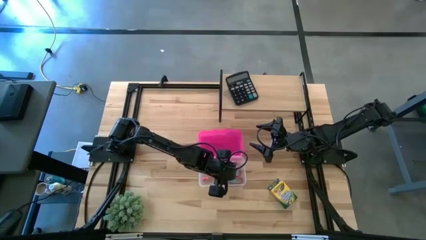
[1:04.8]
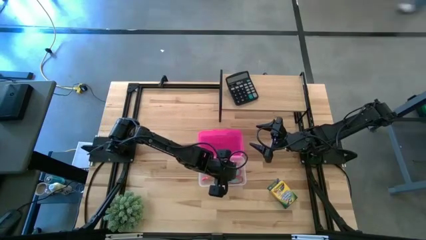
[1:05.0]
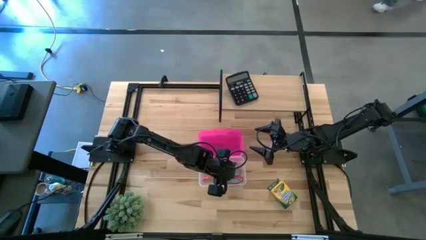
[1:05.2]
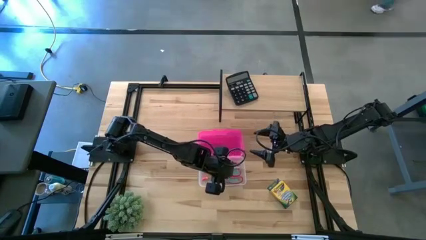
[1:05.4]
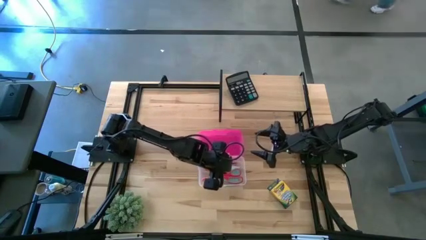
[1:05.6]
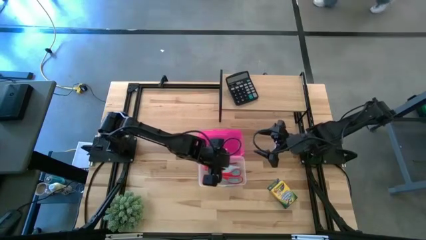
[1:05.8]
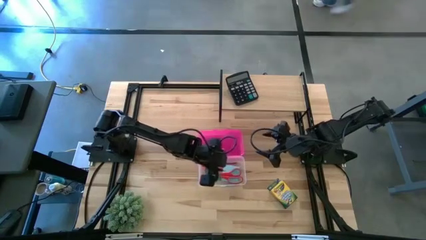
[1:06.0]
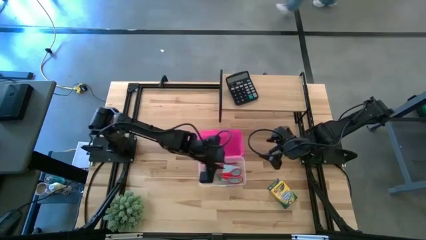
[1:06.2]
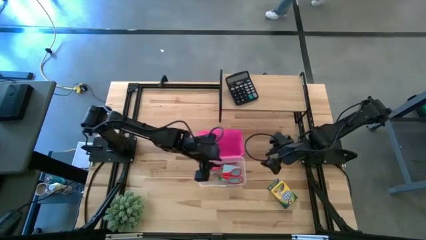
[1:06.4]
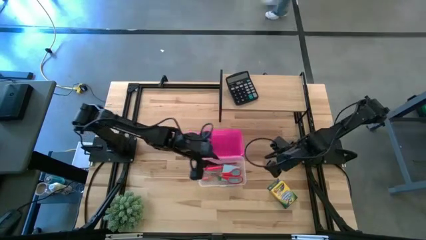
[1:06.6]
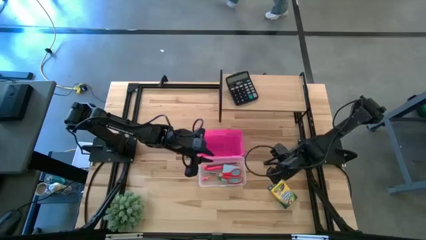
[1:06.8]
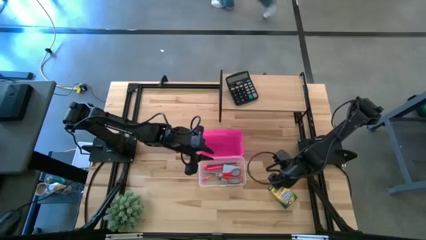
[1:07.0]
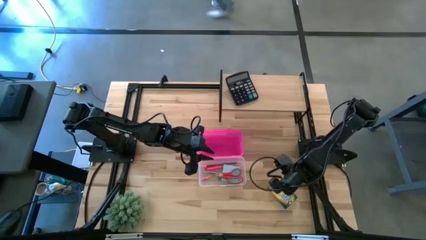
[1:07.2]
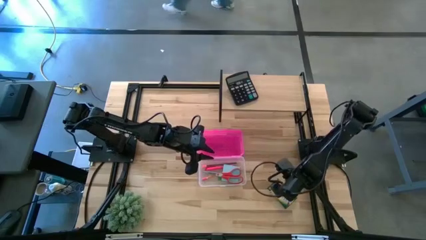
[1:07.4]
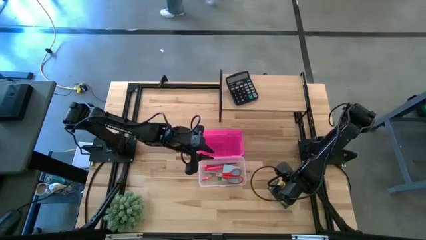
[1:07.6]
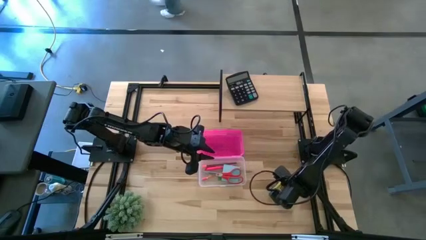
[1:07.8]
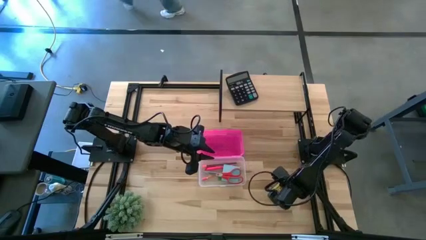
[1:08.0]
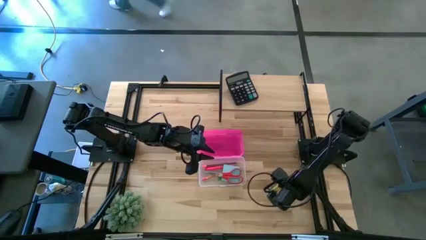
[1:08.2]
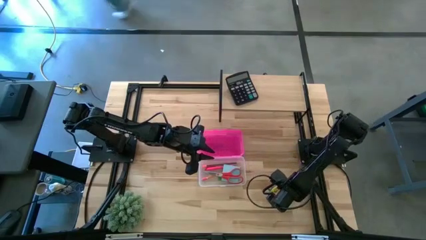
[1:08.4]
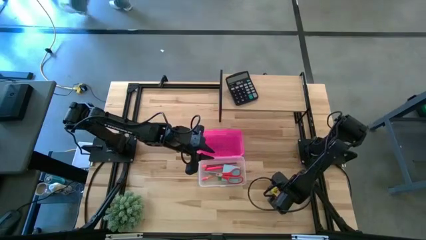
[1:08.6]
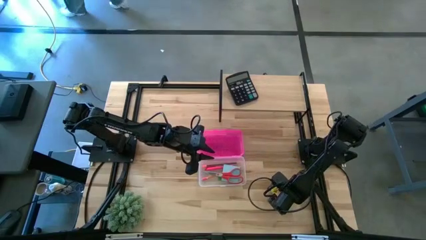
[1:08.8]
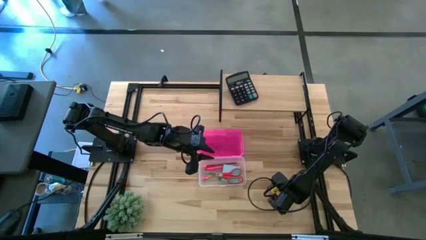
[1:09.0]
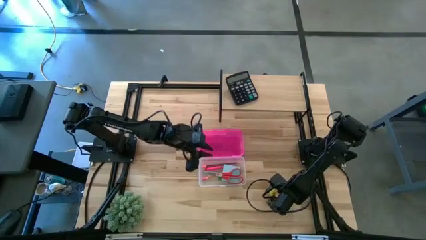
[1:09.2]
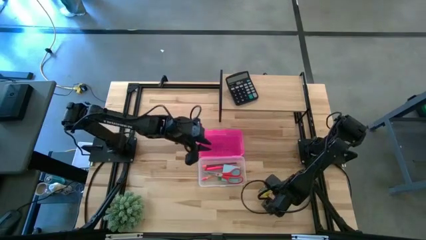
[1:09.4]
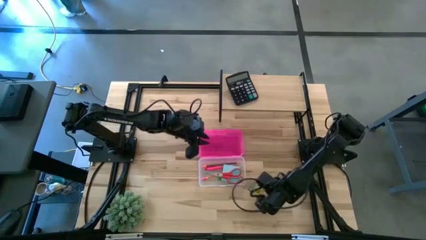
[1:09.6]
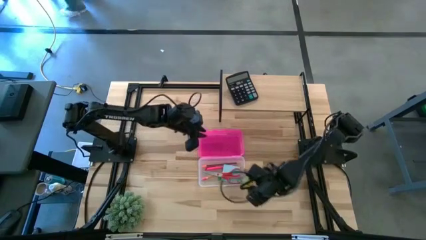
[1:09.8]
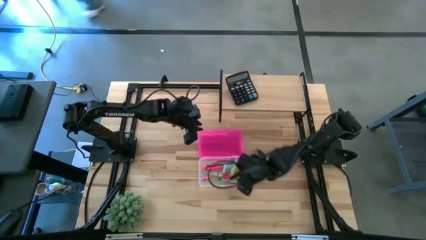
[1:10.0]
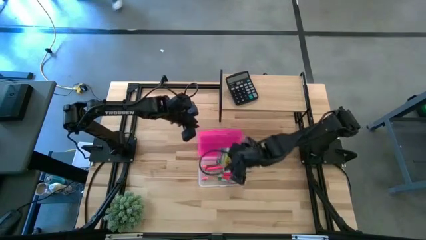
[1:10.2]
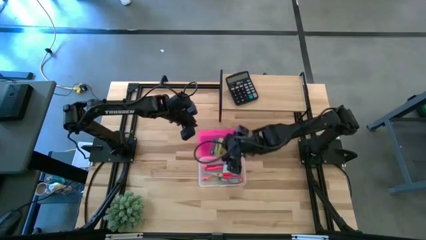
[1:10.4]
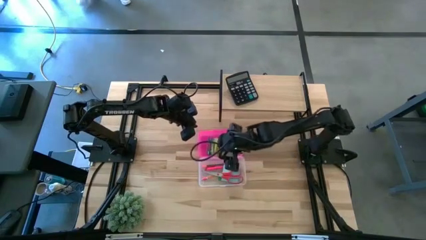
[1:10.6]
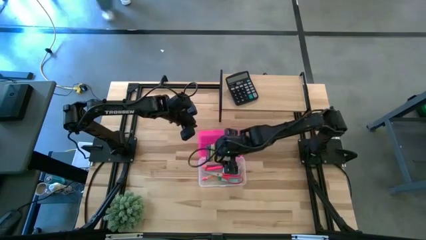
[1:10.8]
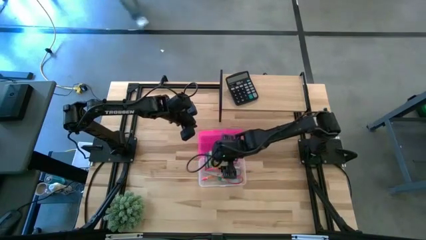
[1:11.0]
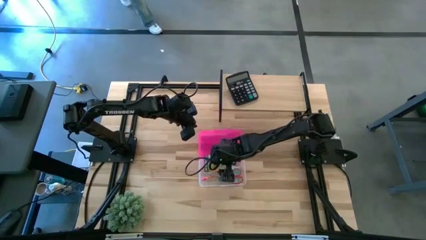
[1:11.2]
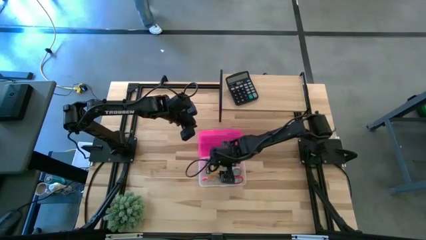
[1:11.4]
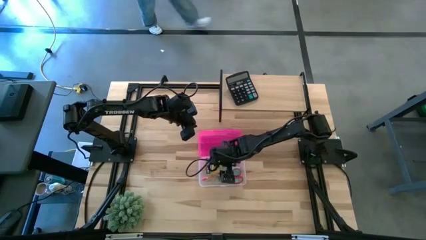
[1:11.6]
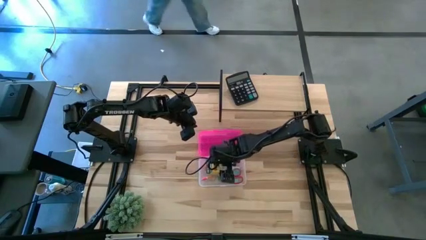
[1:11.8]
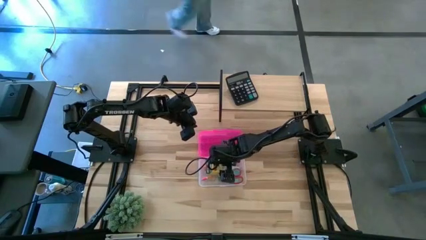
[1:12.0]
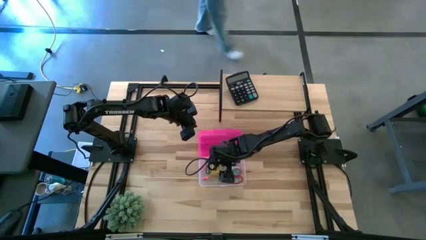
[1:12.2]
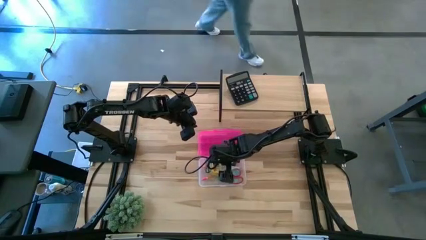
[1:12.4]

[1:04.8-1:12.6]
Task: Pack school essentials
Put the yellow crayon box into the transparent box

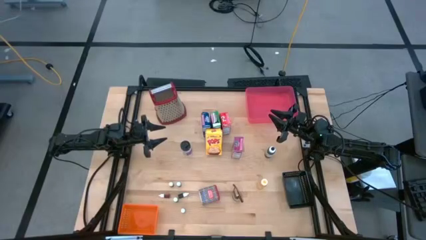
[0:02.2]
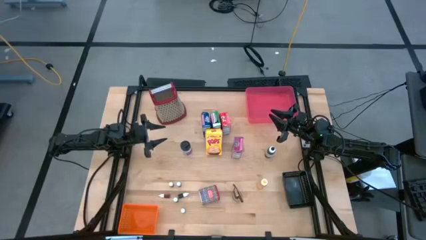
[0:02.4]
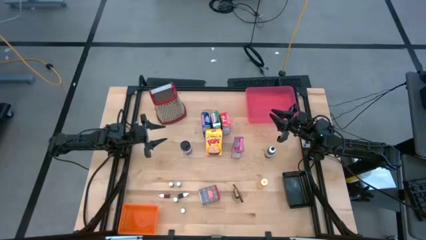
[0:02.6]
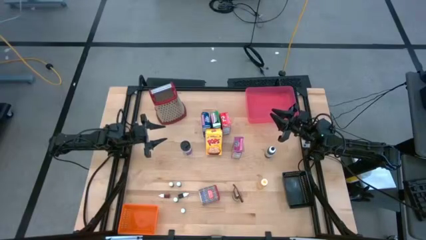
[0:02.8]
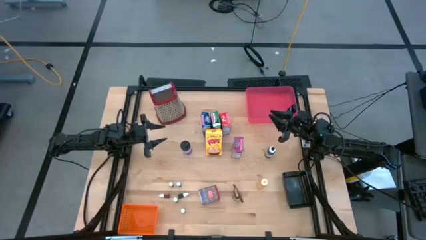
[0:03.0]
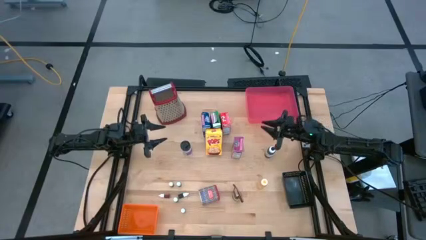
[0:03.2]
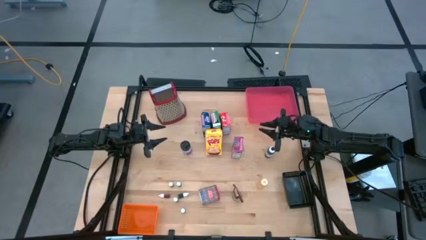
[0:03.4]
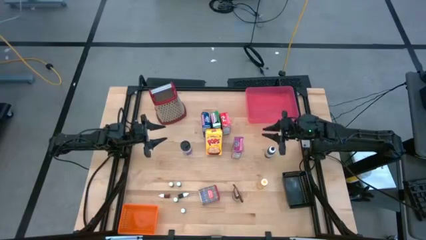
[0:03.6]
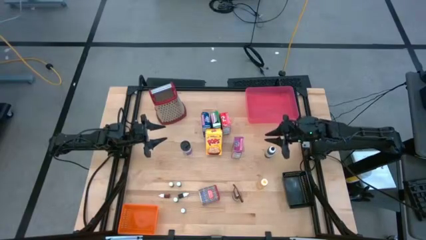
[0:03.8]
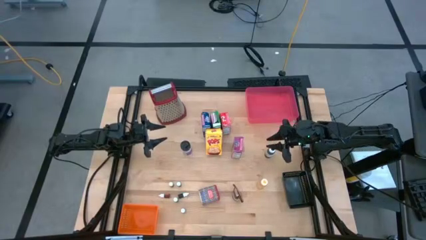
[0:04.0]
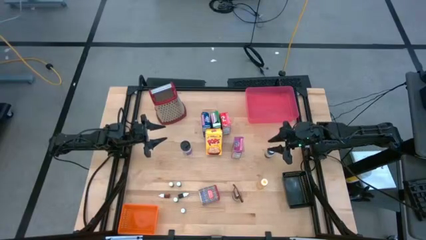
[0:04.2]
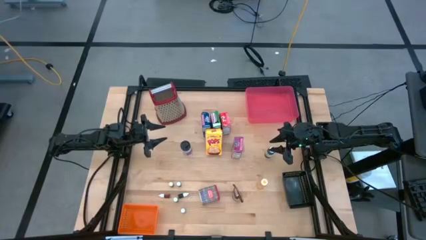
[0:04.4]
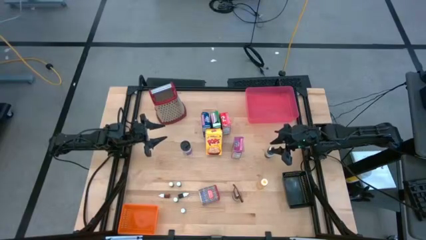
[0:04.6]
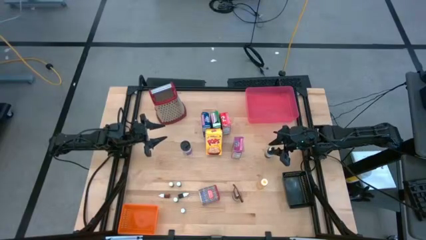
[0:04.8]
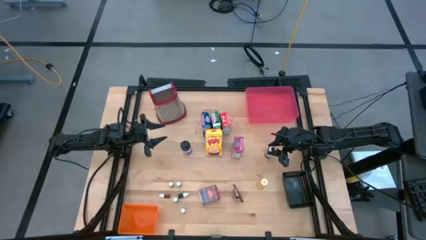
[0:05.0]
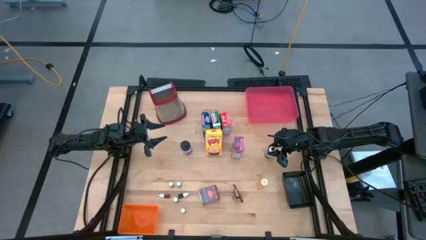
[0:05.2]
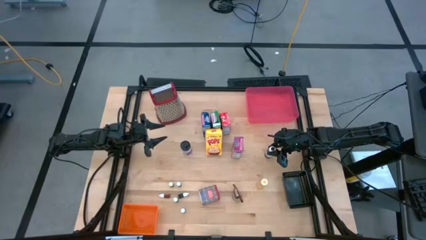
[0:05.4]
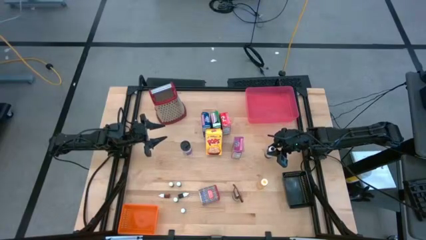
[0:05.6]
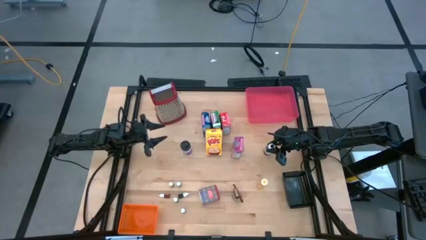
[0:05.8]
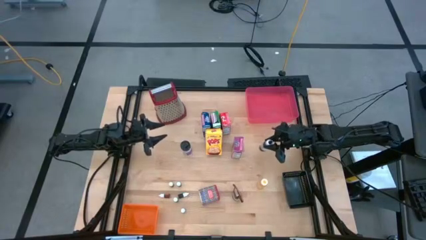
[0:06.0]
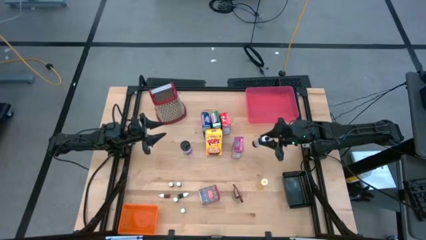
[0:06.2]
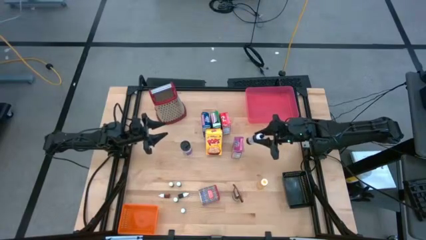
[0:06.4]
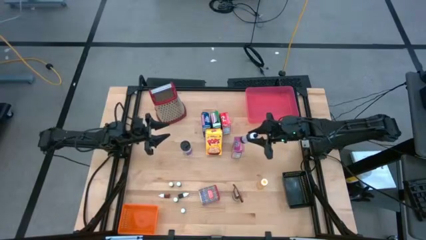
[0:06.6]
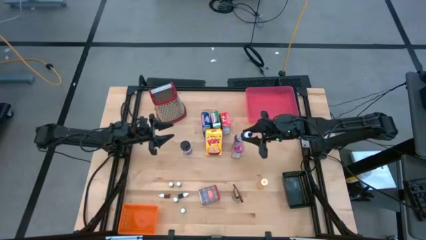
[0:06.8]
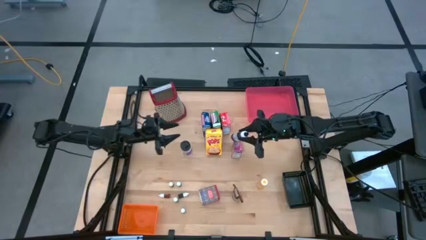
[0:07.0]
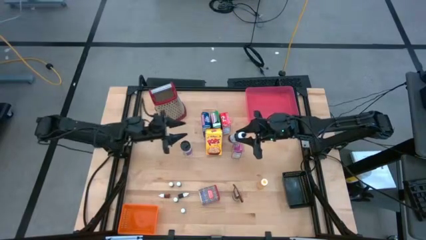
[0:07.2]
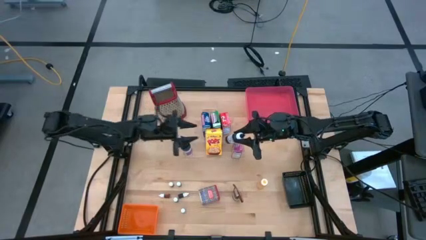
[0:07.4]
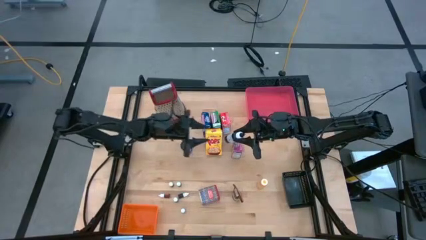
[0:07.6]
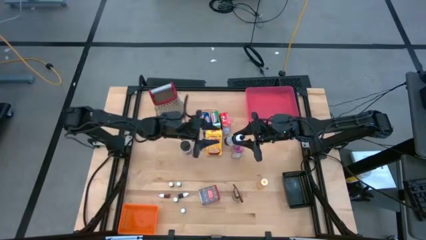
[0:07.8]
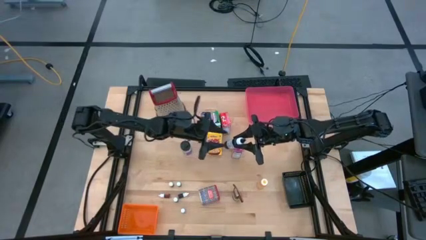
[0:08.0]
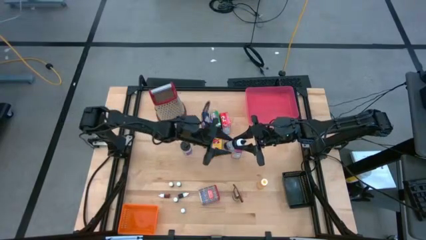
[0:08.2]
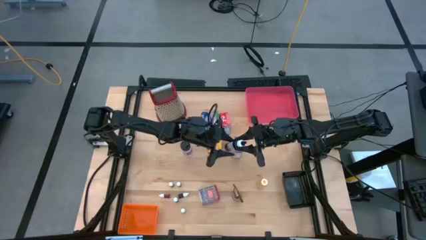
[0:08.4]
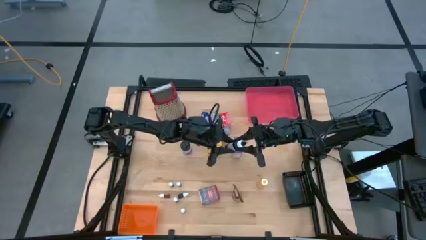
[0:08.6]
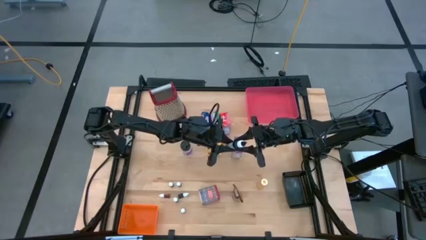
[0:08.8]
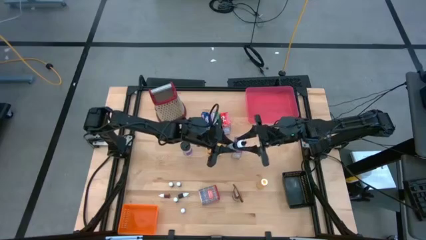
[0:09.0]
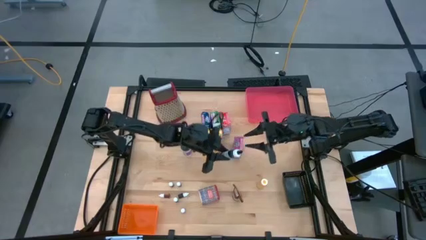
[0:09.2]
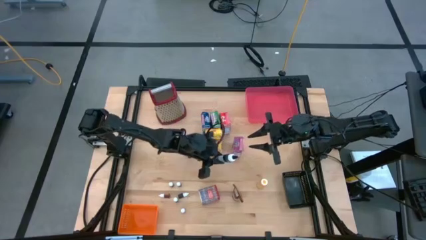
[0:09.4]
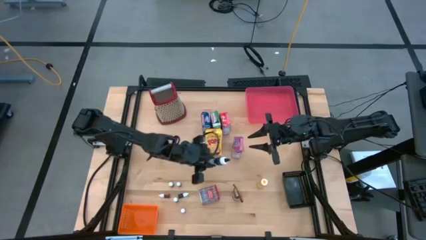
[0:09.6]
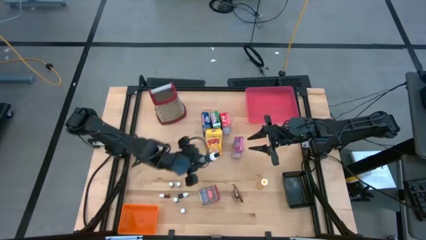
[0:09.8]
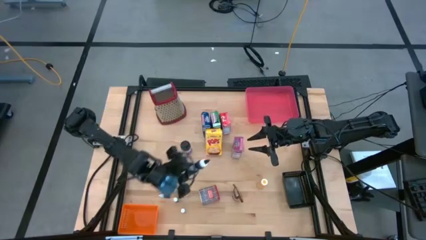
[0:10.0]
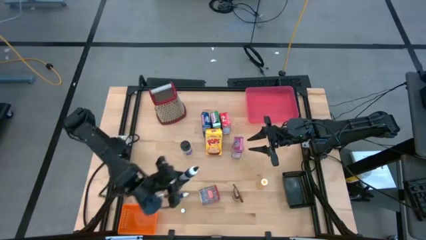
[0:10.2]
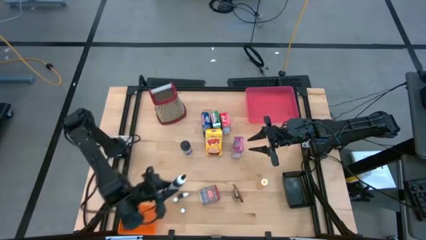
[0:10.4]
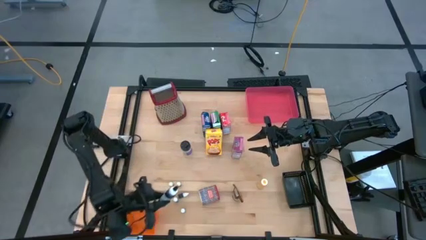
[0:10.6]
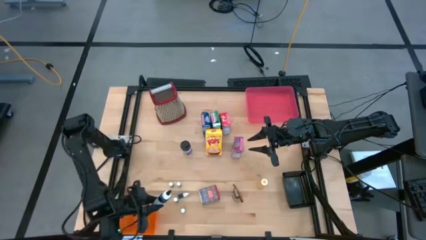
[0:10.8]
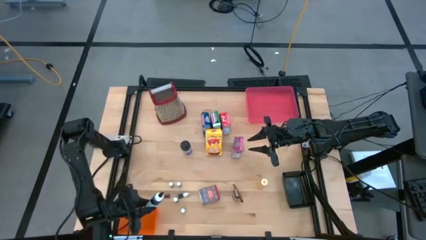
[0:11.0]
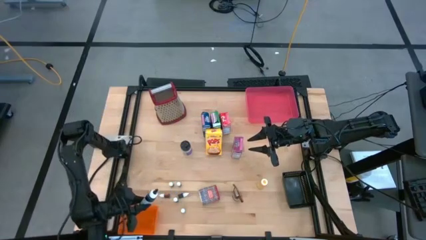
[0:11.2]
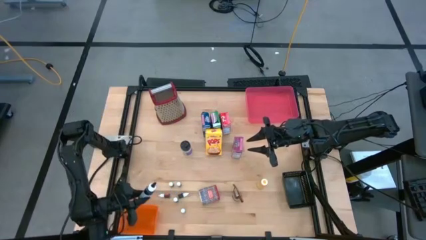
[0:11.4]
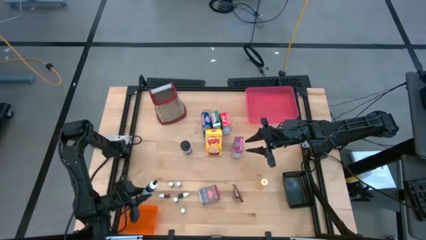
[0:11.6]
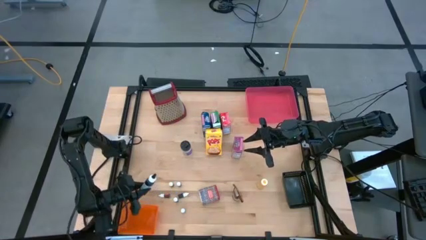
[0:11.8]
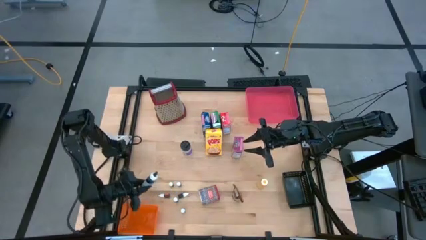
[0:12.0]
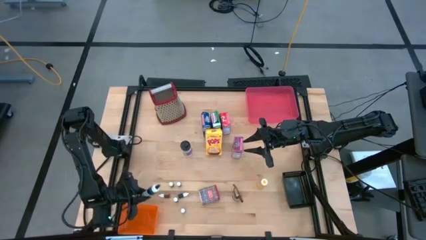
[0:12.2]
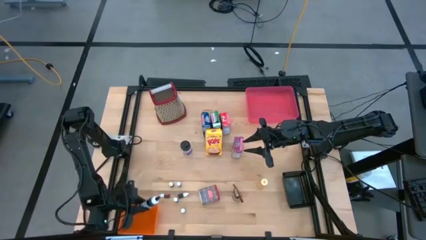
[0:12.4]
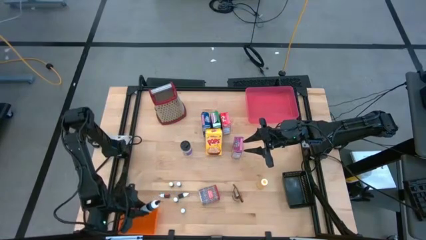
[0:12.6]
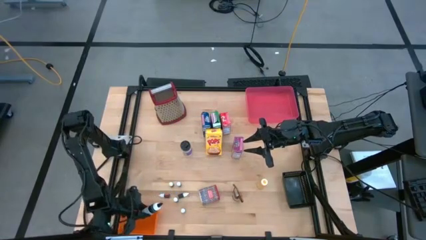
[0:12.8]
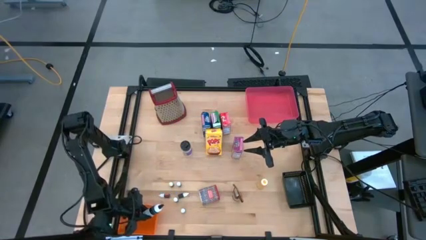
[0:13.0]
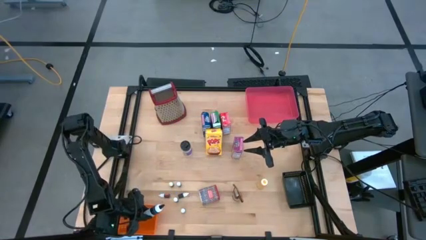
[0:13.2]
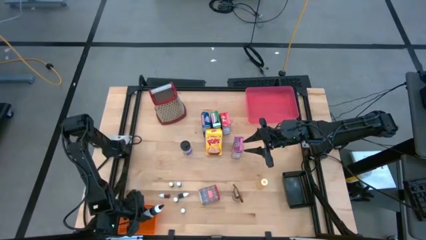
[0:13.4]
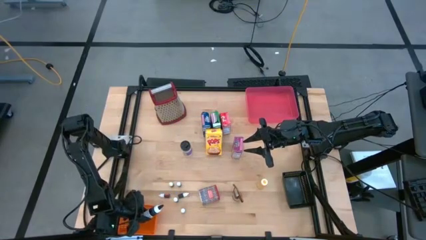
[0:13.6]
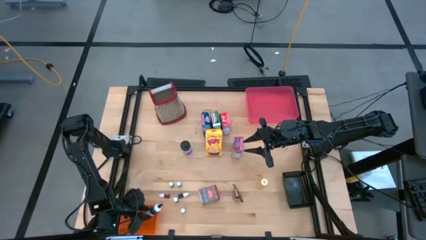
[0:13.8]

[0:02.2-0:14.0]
Task: Pick & Place Kitchen Items
Put the large black food coloring bottle into the orange bin
